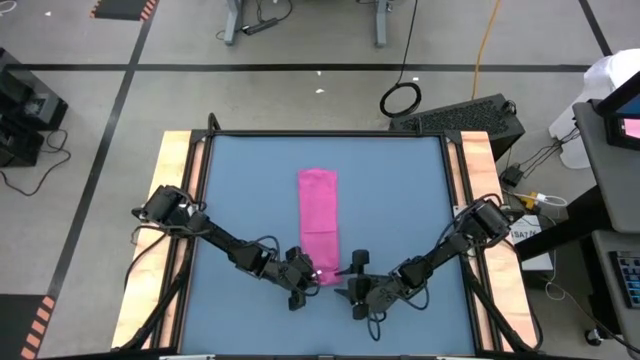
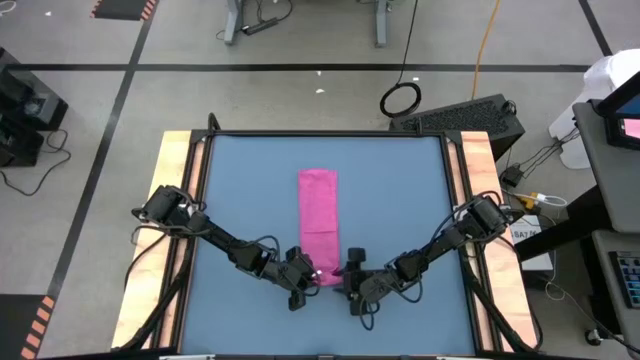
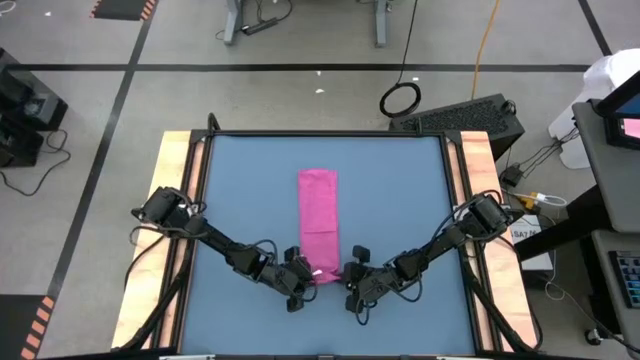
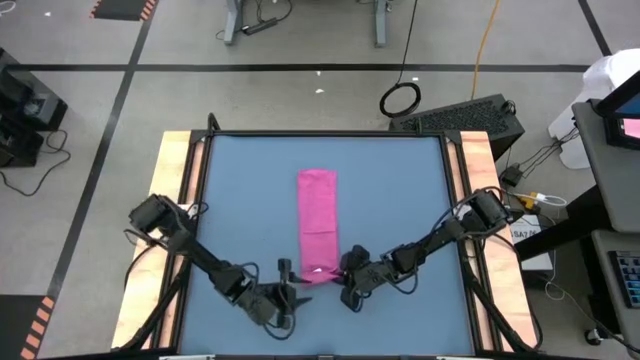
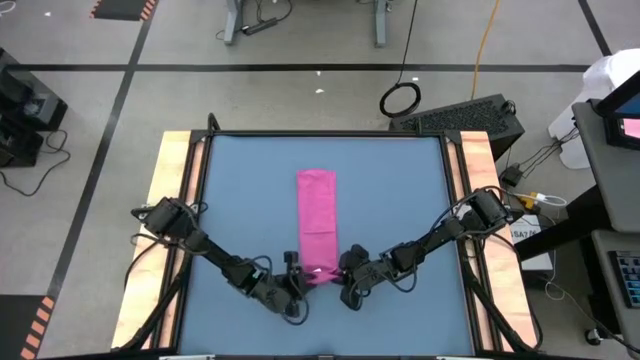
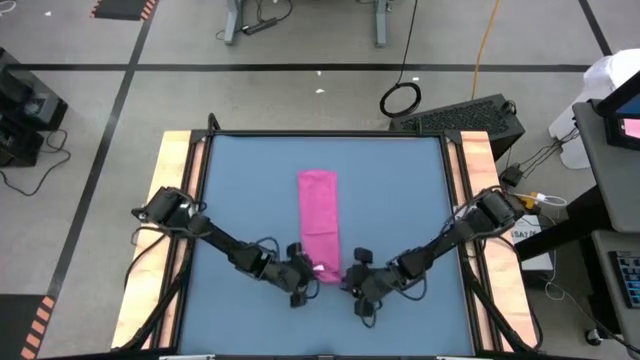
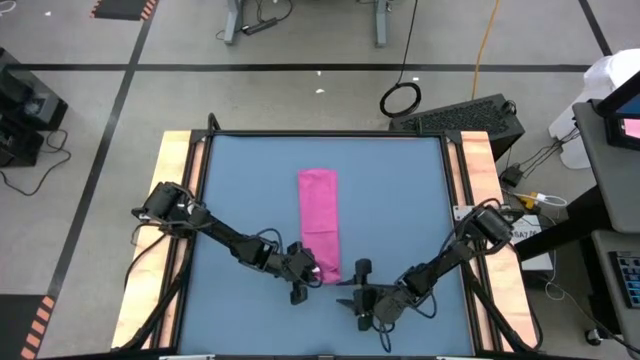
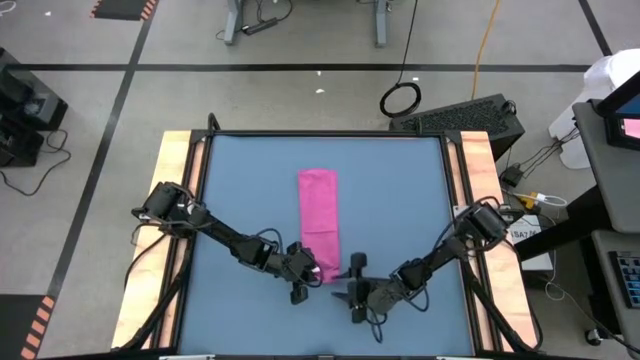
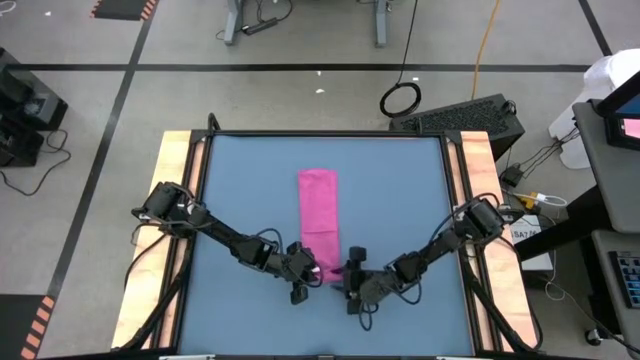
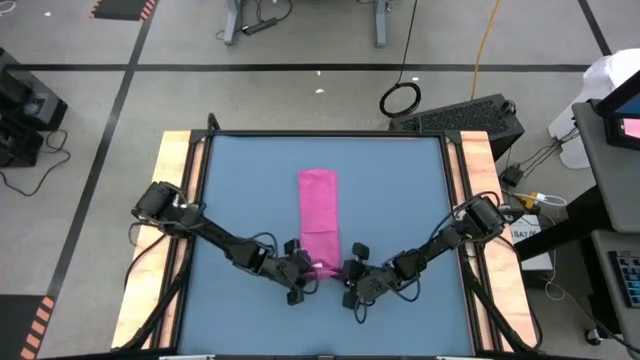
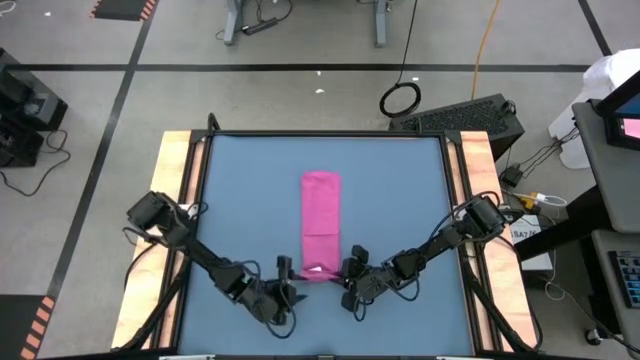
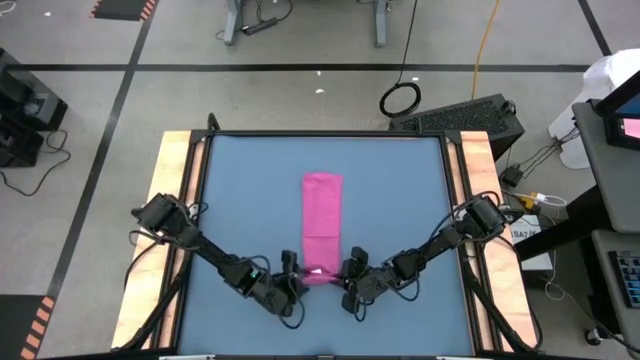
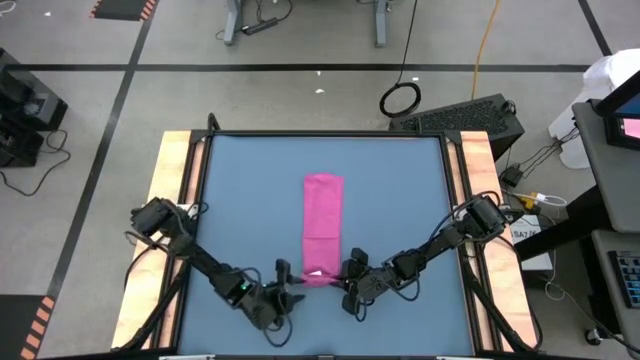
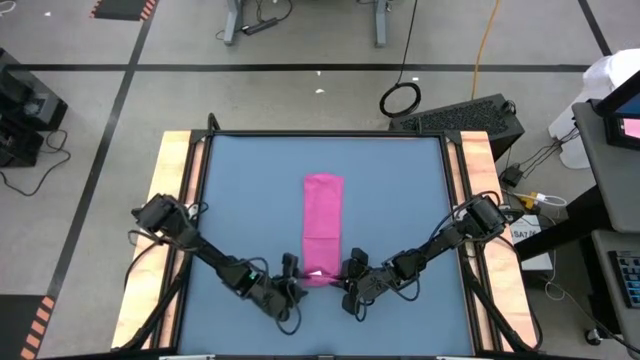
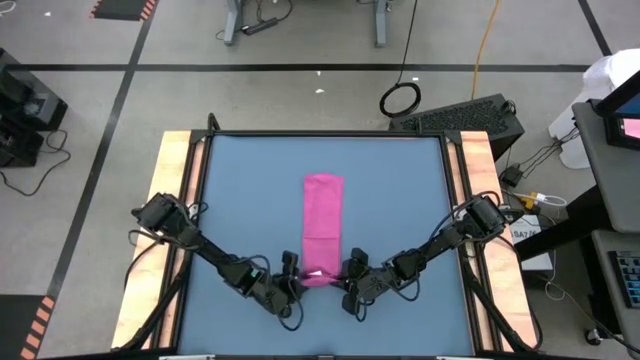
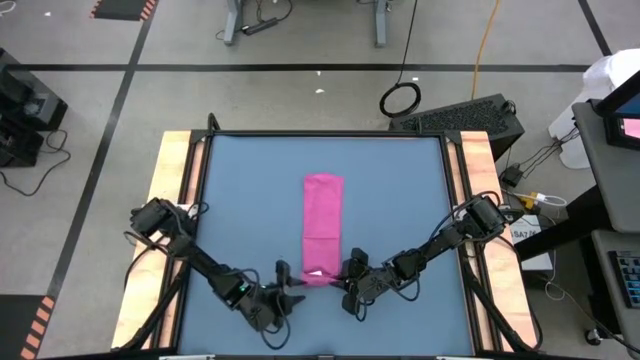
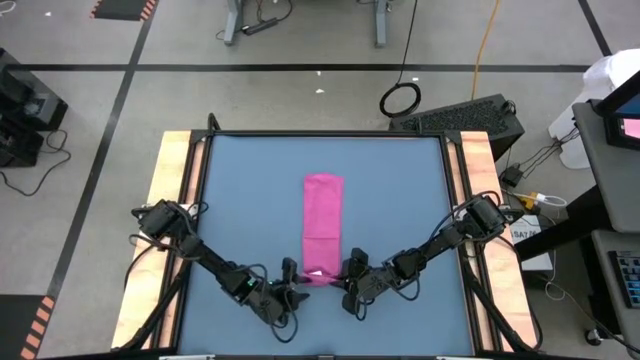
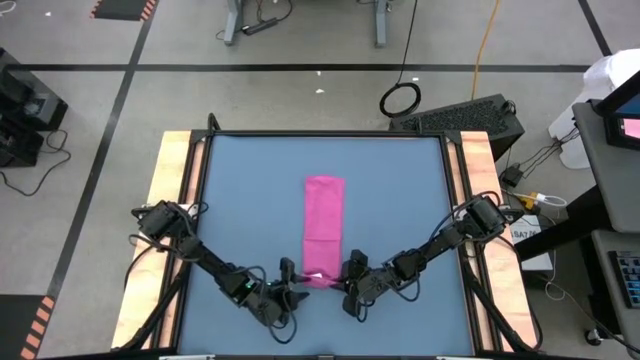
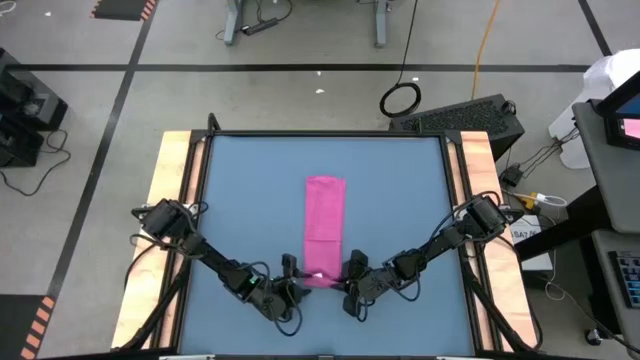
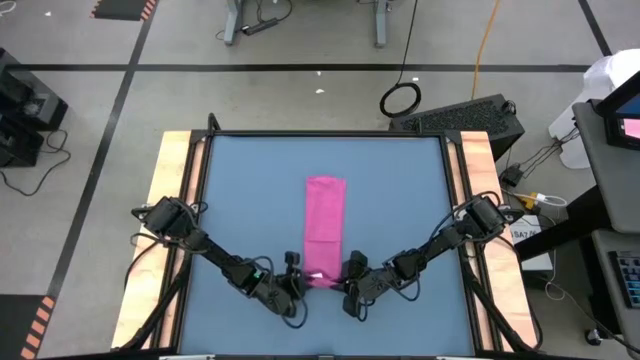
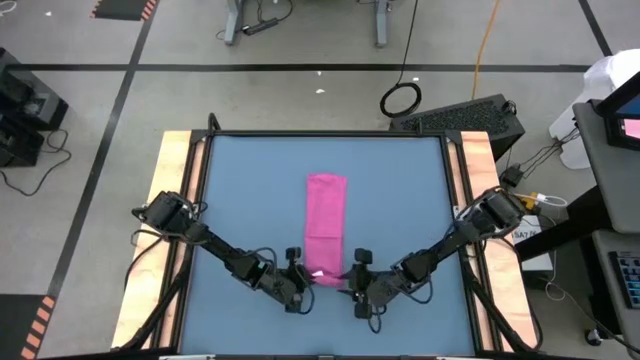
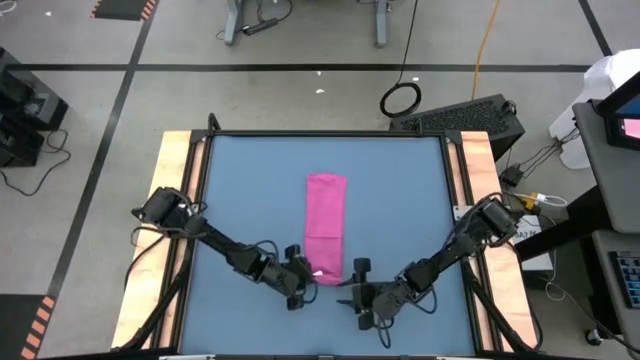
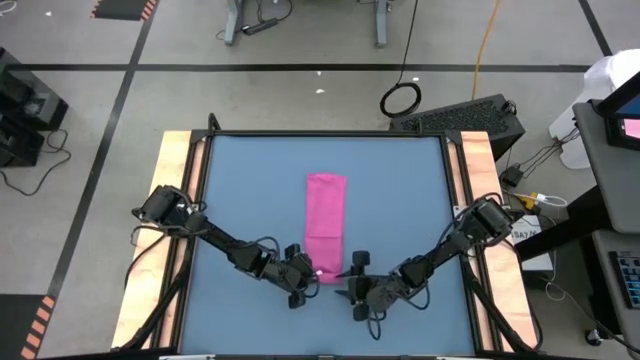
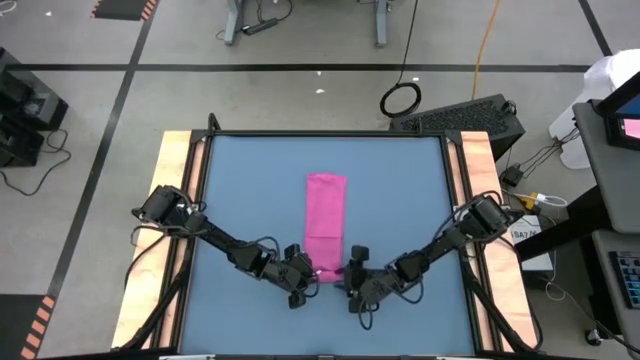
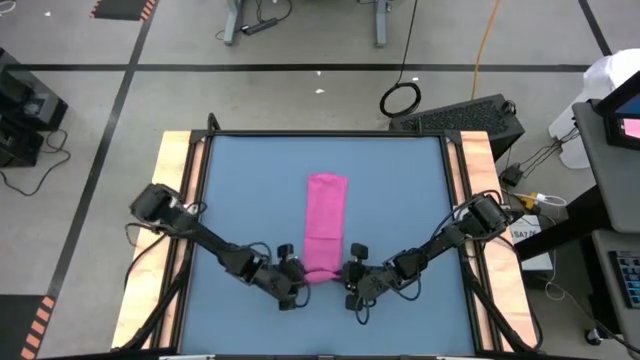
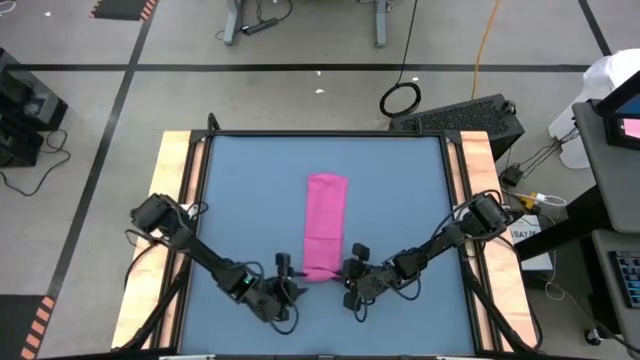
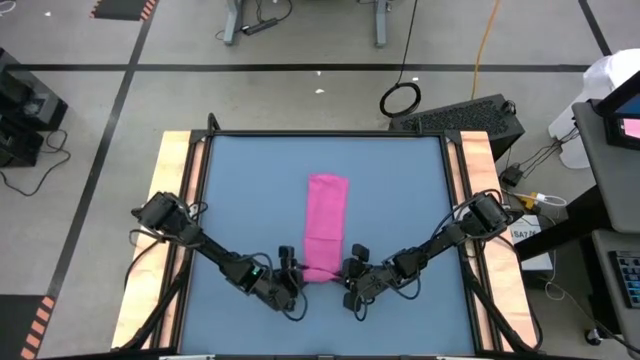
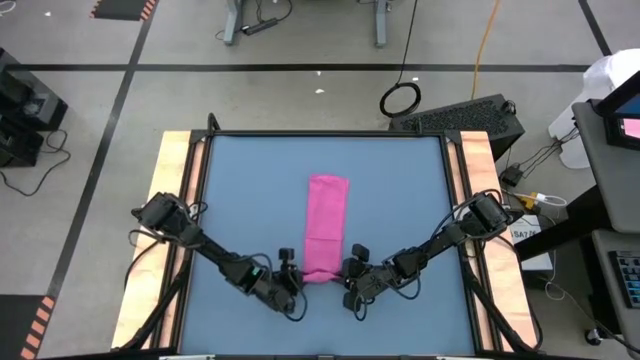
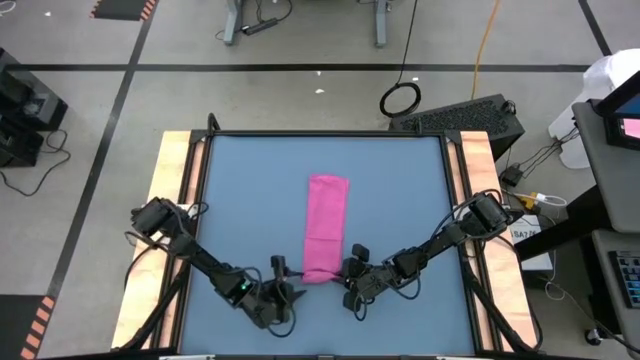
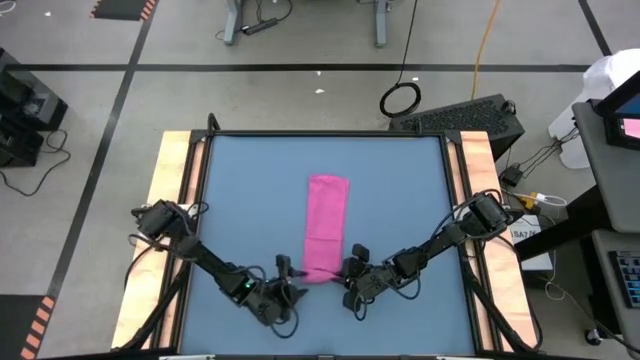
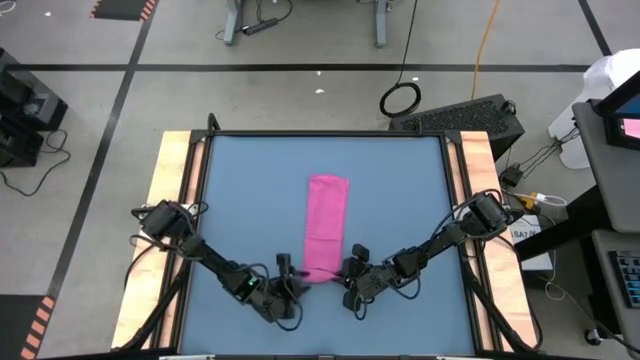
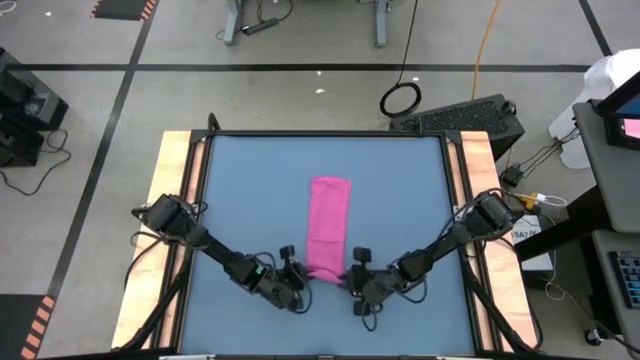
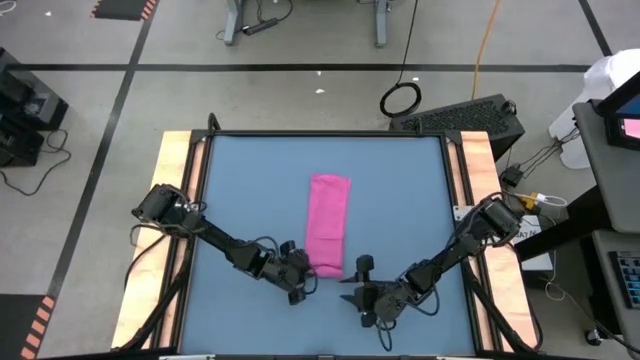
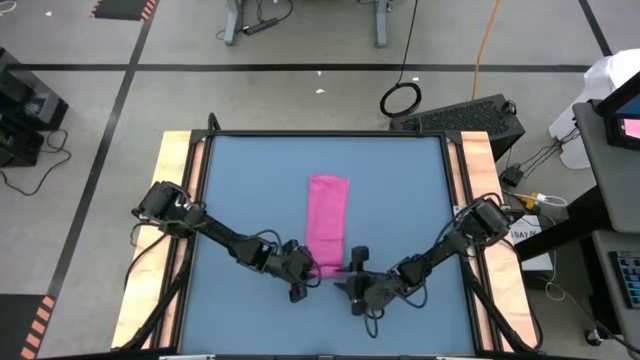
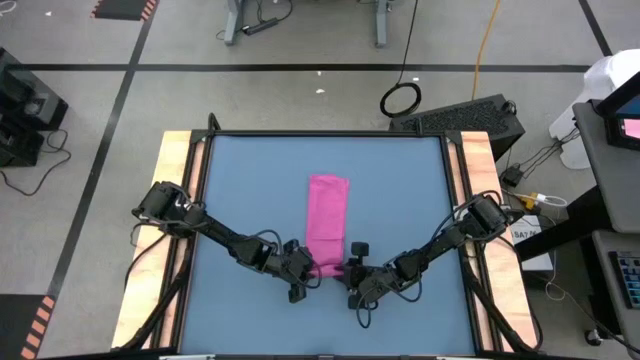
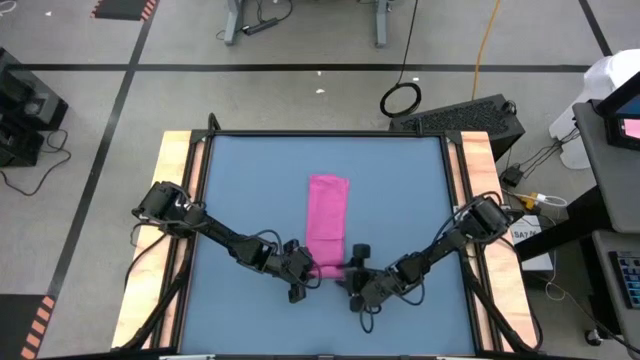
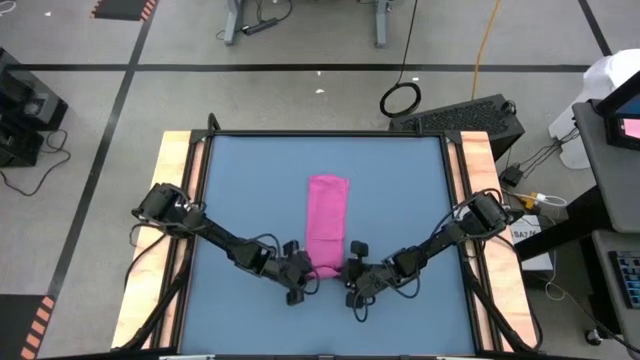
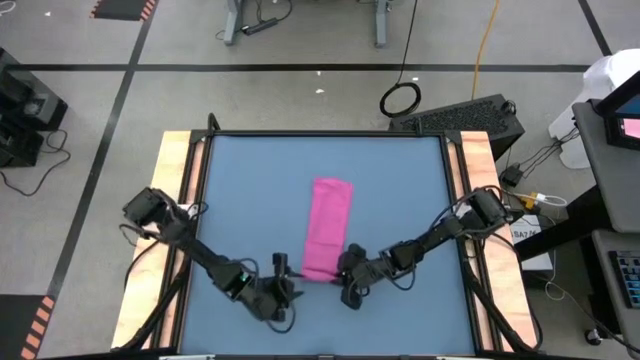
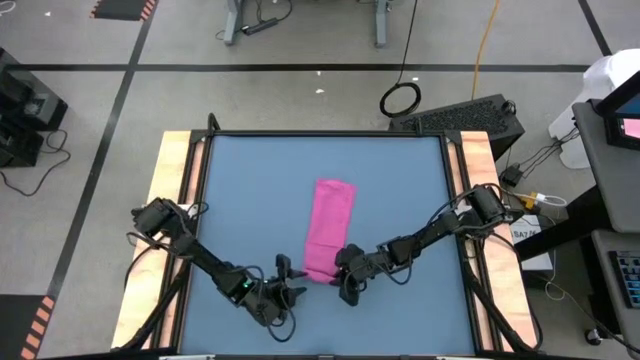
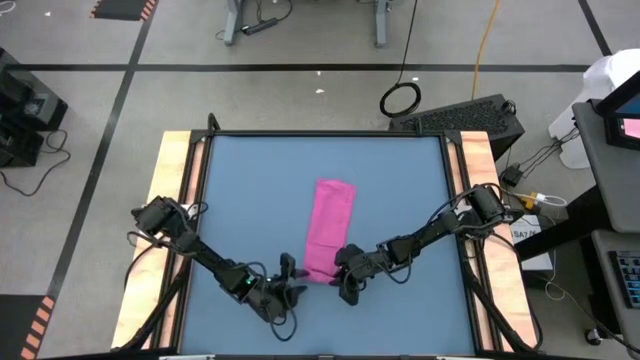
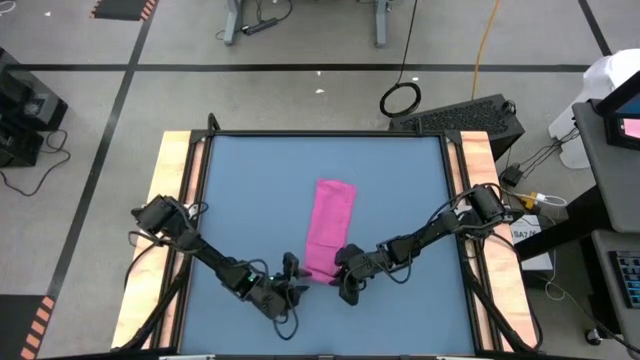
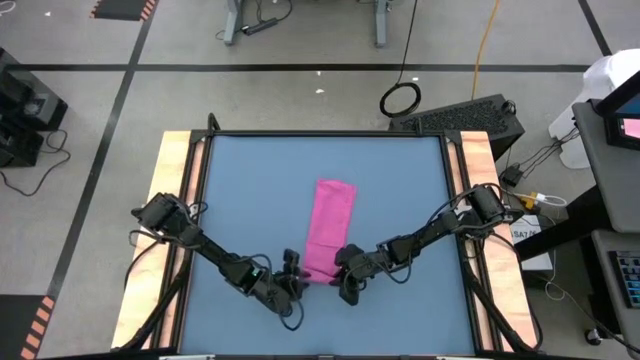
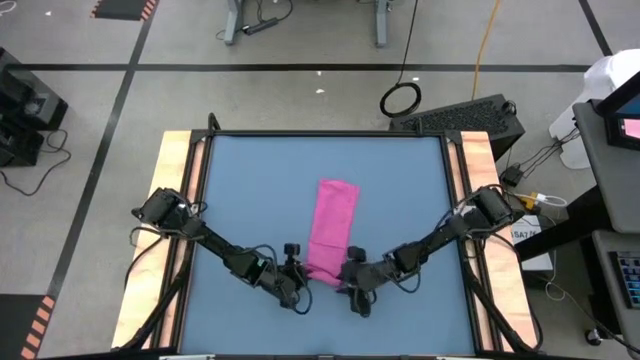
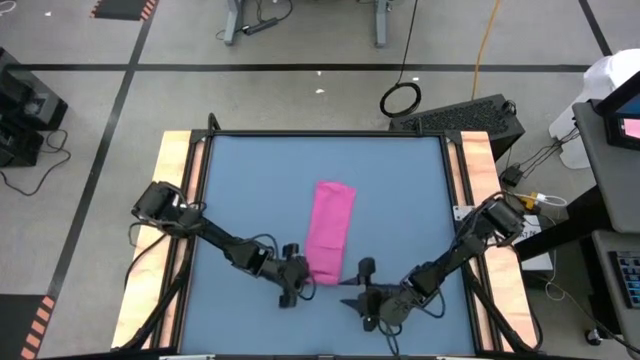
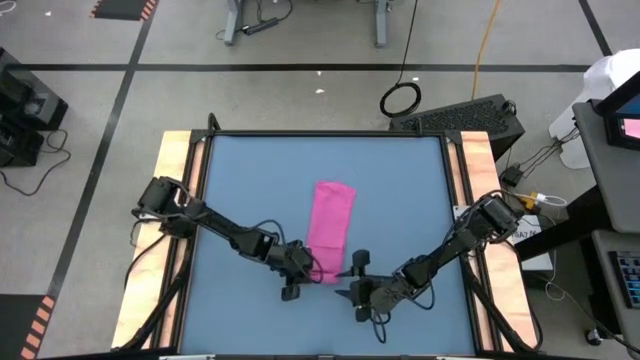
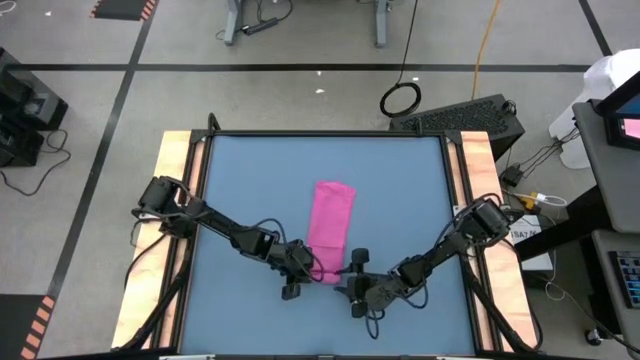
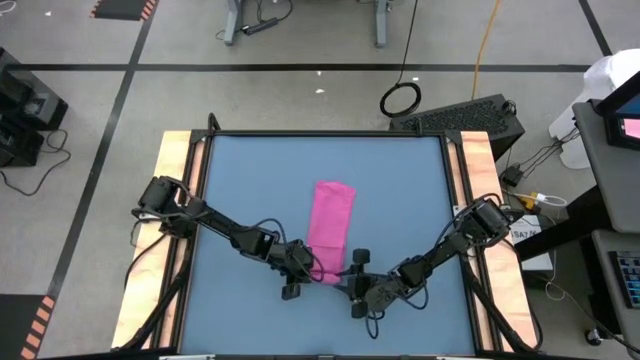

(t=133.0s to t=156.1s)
Task: Roll towel into tight, uniform cylinder
Roll the pink towel
